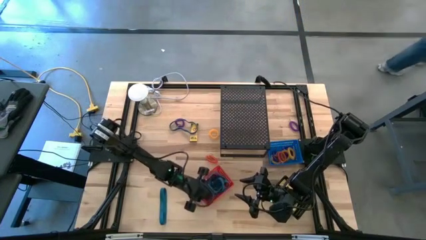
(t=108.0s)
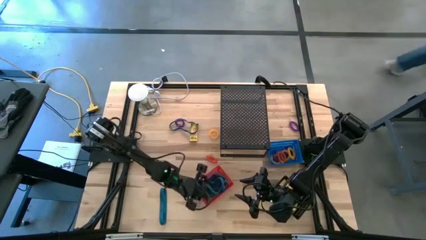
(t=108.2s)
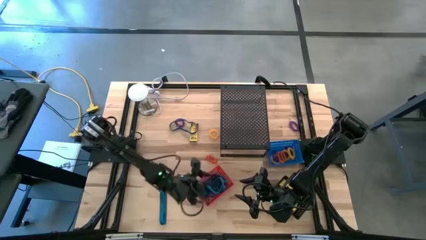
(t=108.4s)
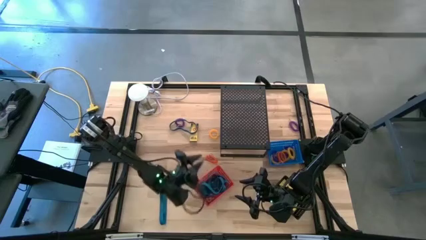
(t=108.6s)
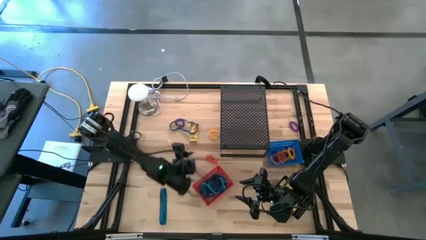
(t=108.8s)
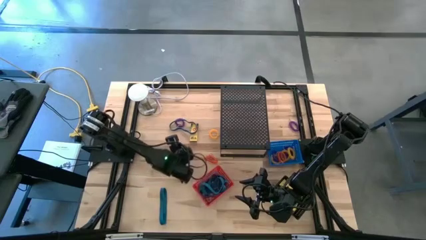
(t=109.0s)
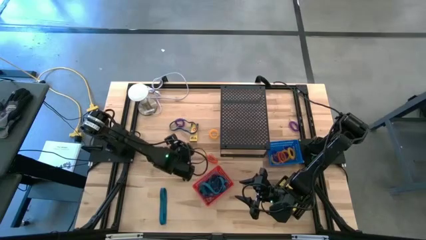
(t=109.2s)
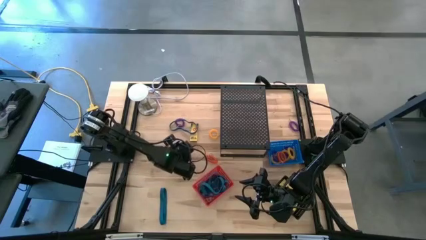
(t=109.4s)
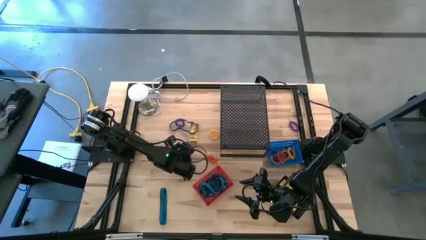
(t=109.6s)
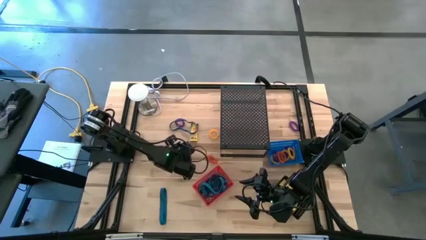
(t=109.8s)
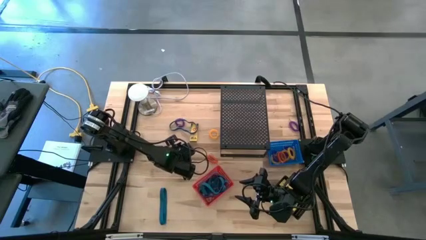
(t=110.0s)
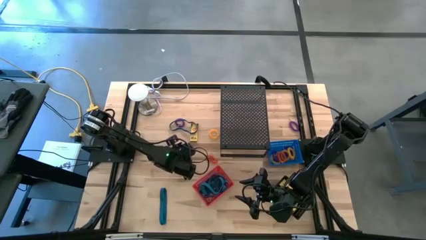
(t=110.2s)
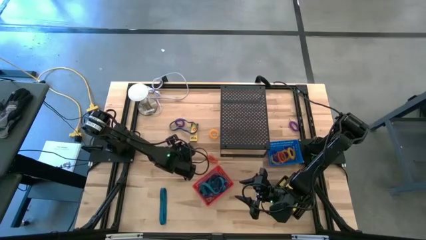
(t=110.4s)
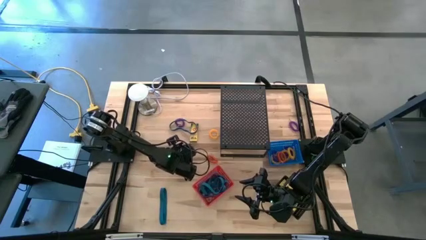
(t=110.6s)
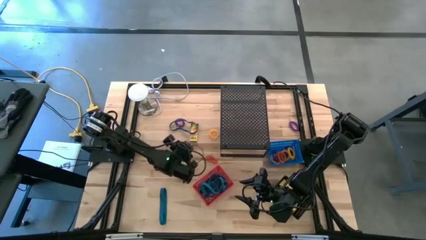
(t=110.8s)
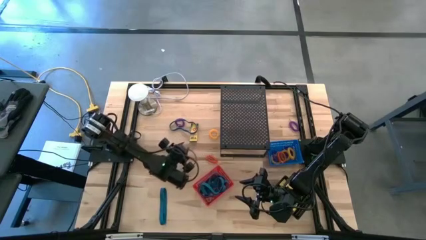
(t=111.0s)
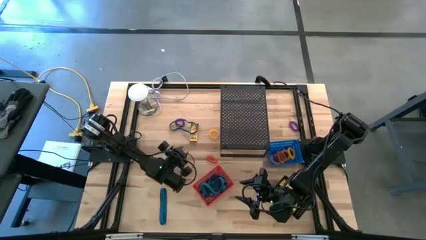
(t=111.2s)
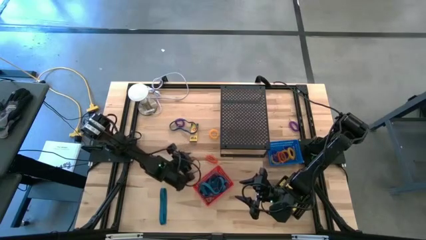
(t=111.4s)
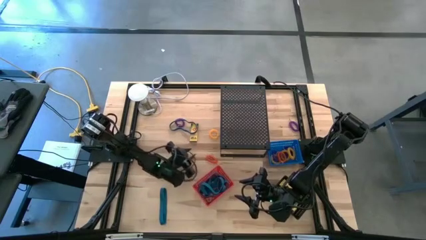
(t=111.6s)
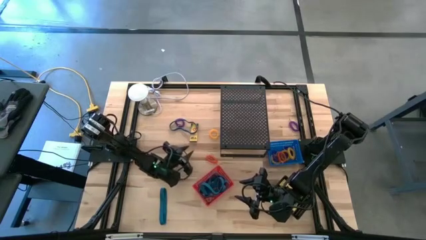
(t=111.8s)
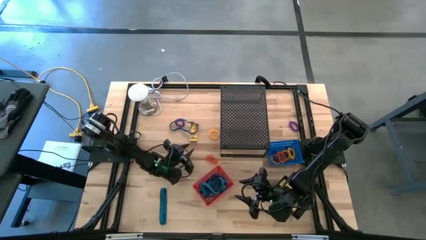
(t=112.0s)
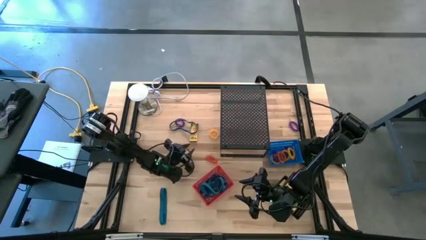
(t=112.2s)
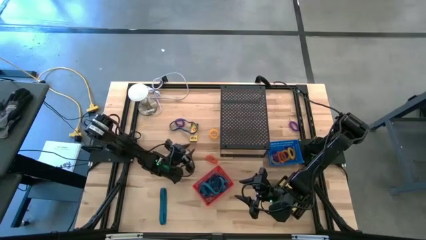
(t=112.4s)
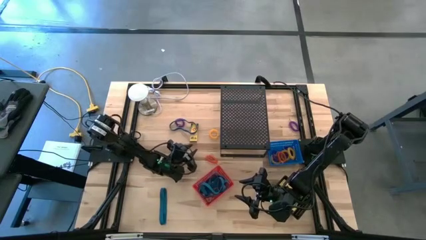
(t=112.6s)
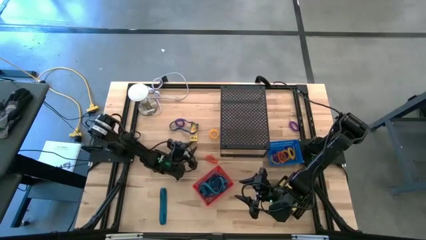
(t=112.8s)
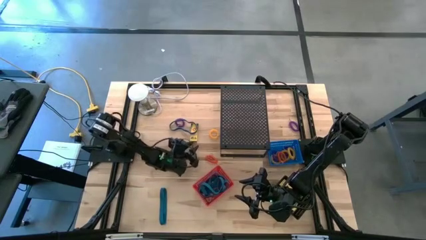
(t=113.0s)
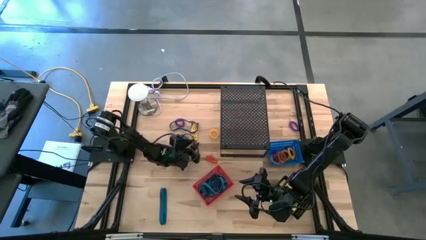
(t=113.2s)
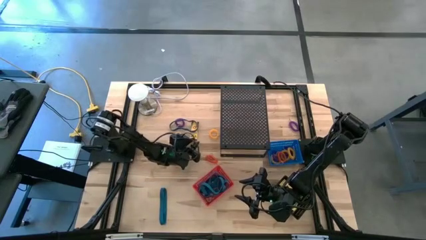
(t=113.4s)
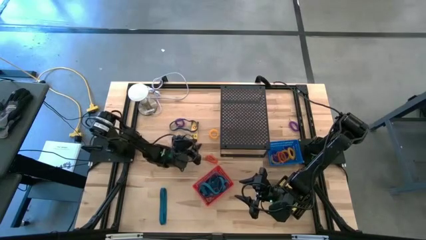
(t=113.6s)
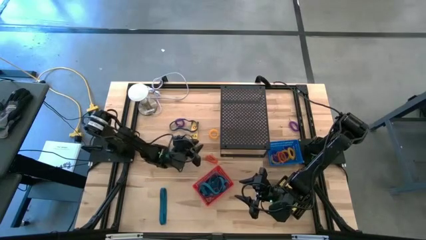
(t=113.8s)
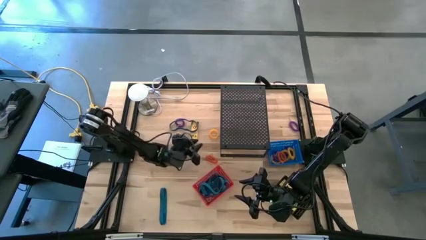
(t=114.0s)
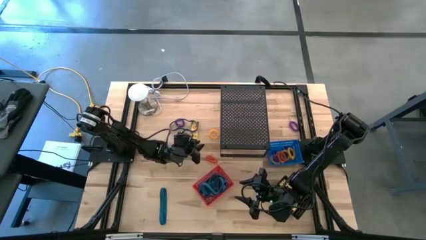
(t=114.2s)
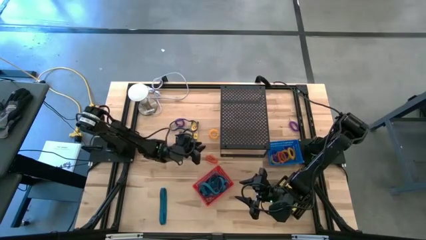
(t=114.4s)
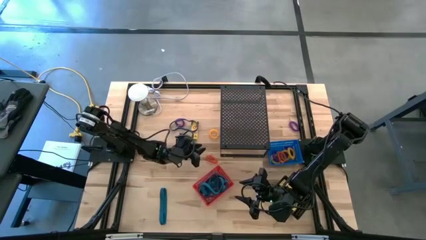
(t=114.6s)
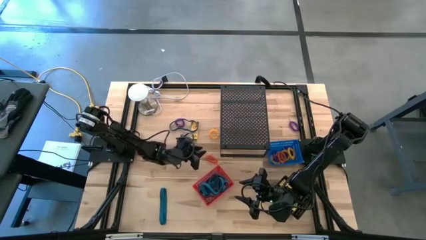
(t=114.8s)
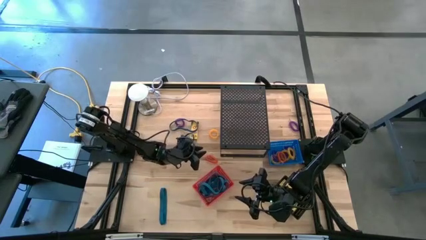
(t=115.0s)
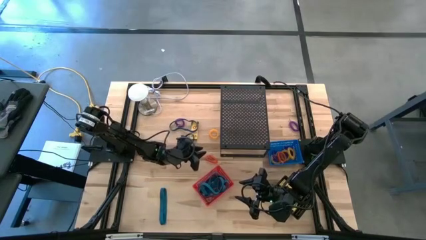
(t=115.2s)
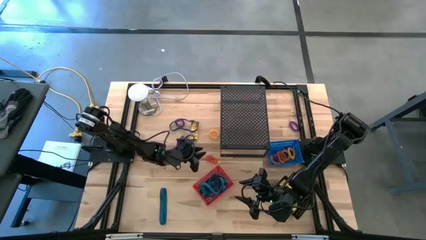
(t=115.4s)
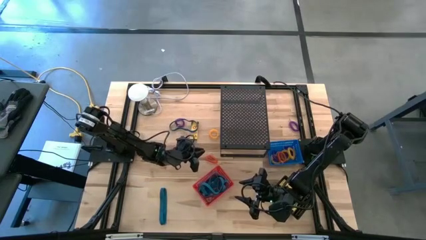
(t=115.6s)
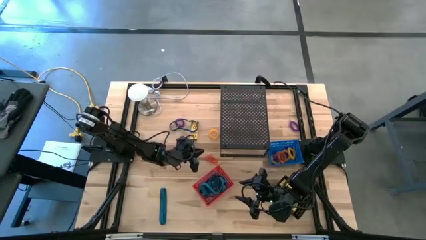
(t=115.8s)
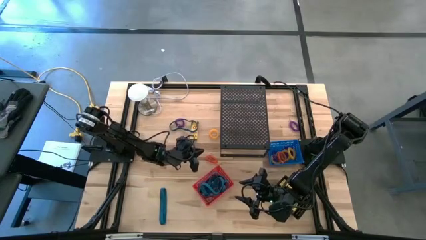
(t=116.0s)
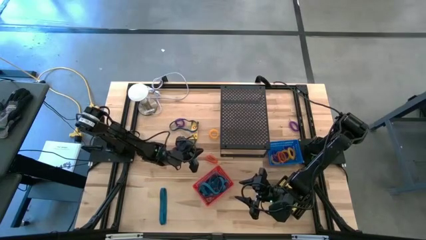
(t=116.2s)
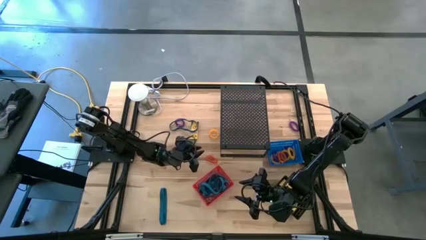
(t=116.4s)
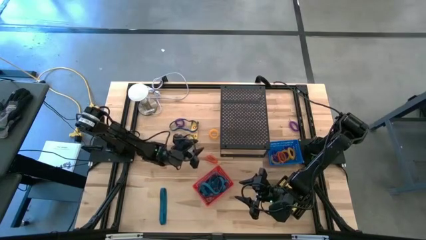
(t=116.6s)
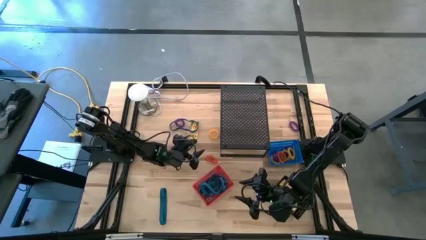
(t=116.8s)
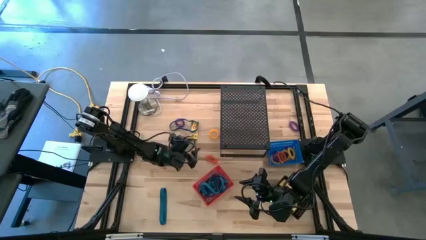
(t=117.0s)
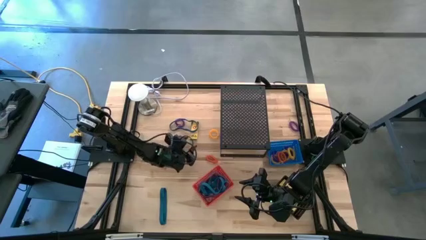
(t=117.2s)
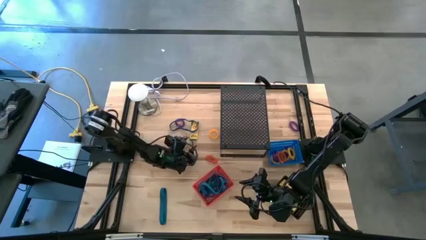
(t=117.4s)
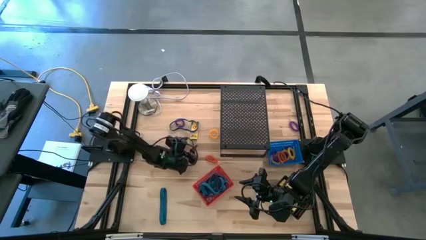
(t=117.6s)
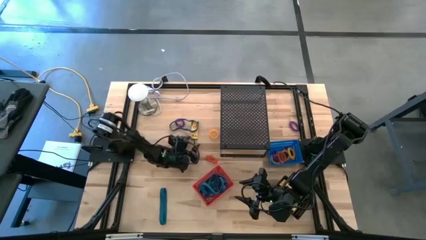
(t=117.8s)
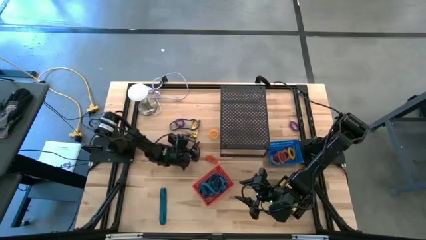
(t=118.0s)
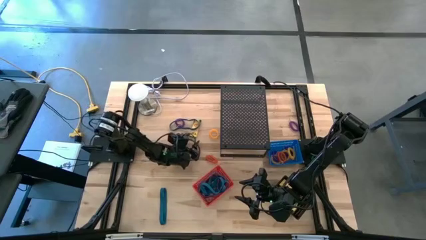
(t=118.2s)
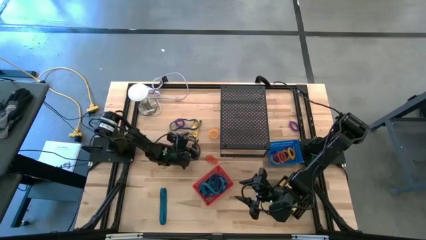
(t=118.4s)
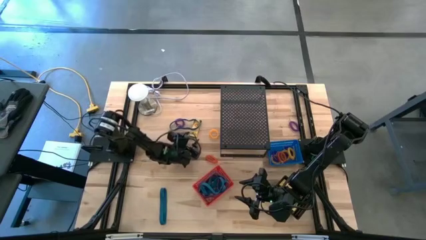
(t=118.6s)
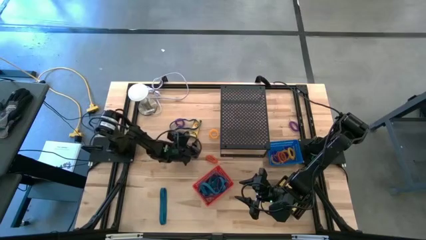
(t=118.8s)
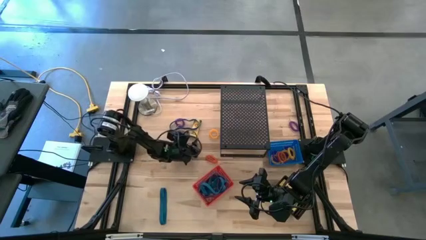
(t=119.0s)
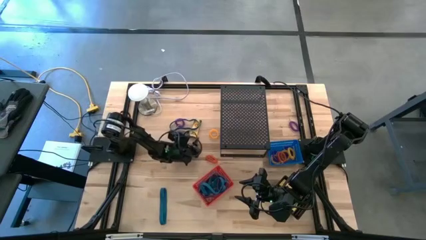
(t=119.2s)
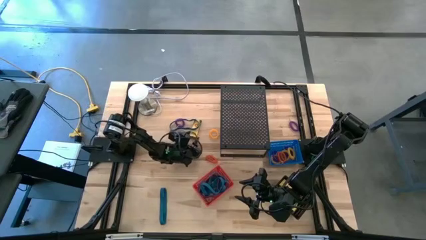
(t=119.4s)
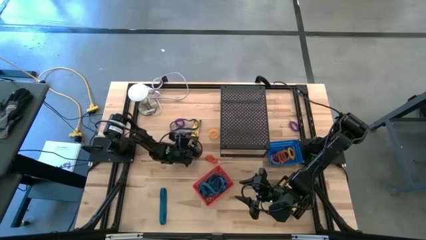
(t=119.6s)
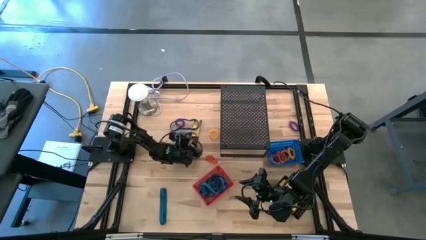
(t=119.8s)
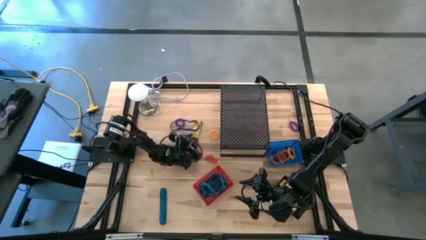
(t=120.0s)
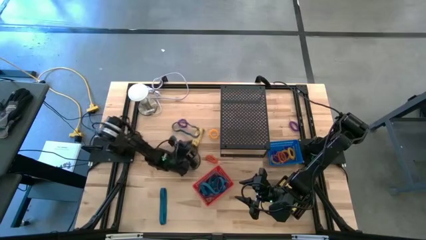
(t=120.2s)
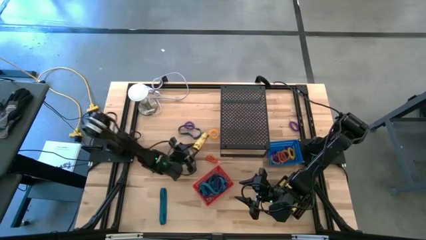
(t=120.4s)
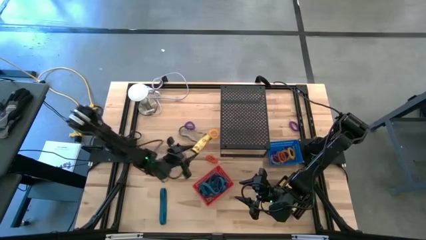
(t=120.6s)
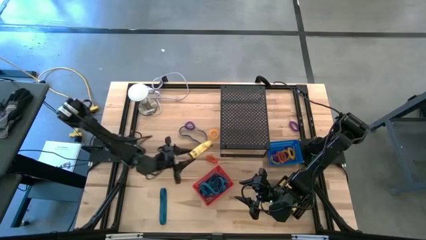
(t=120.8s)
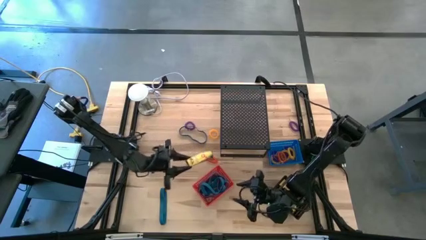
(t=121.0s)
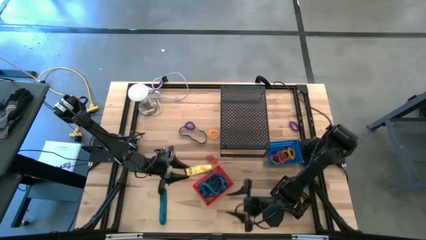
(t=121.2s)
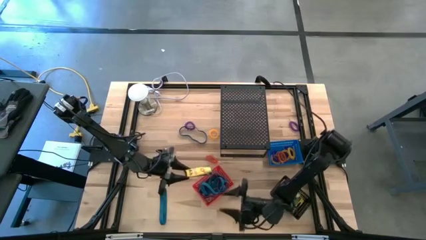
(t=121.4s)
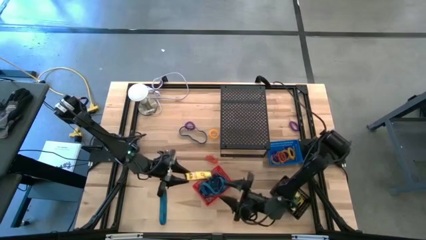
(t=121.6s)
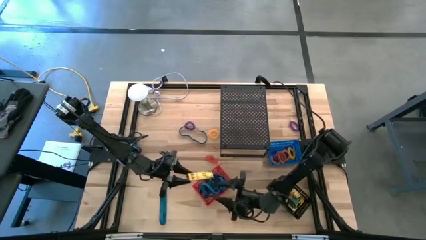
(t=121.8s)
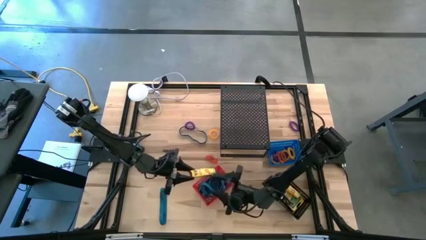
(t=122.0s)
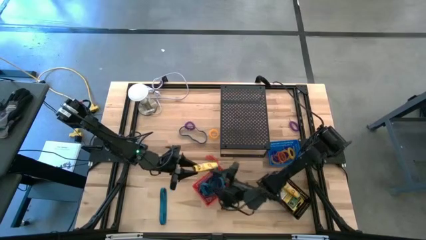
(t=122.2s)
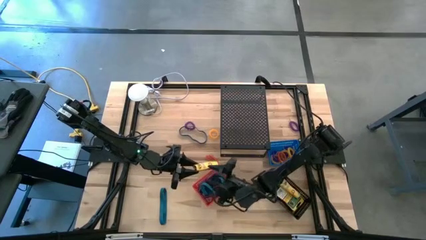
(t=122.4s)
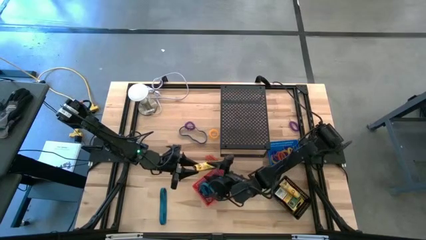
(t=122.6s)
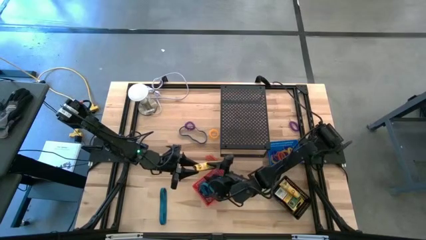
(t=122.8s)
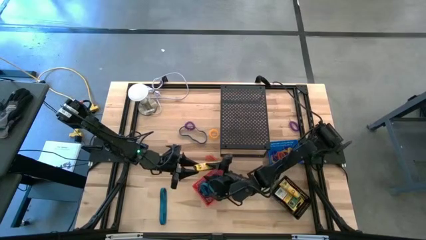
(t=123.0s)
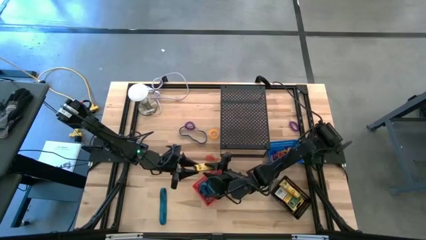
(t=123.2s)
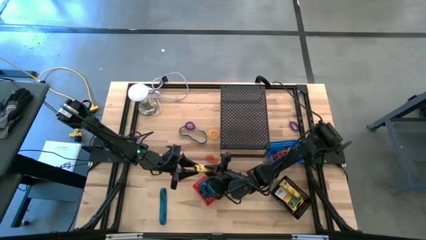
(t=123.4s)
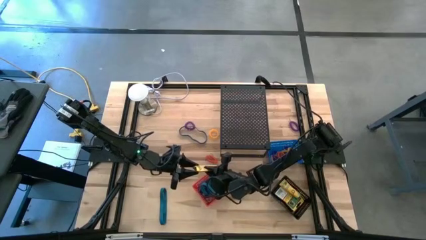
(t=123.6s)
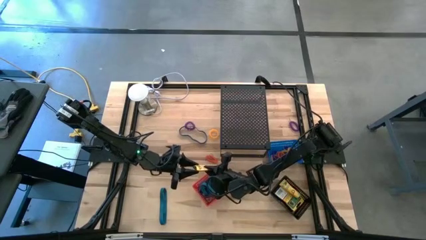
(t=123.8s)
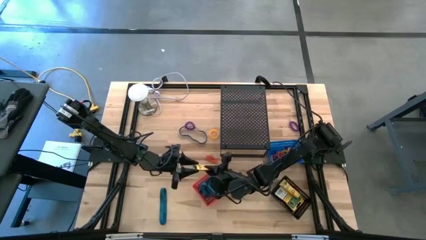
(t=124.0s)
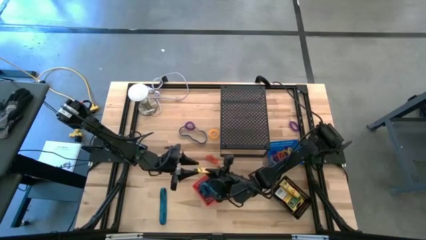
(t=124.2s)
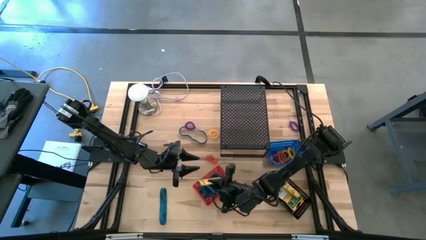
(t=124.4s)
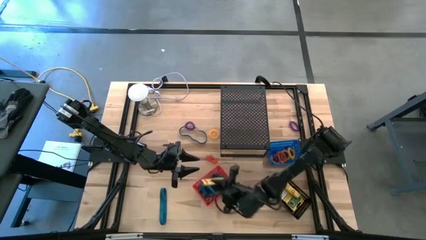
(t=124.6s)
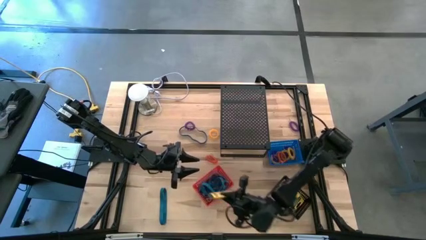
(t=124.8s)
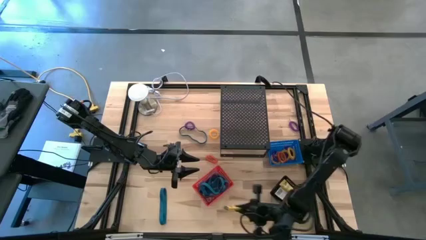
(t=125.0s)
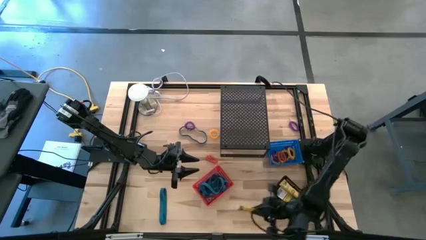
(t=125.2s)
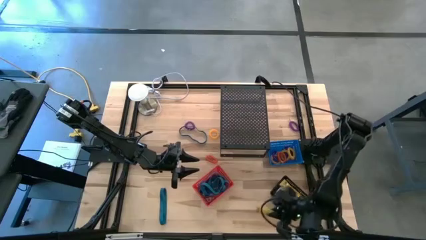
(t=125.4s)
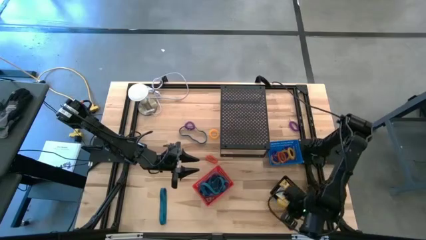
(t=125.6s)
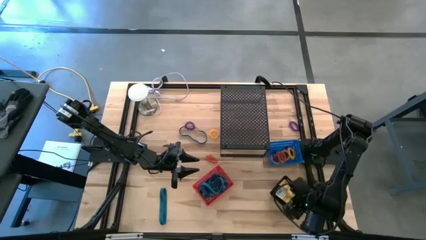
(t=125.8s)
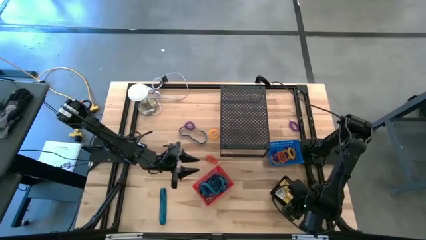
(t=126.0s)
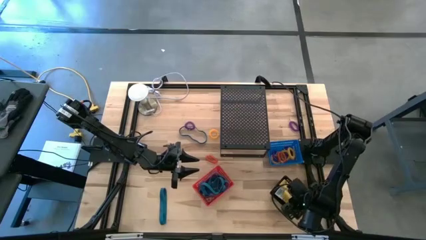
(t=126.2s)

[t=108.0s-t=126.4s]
Task: Pick & Place Office Desk Supplies
Put the small crayon box into the black basket
